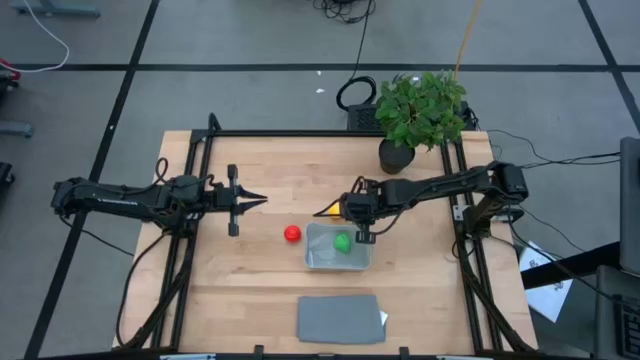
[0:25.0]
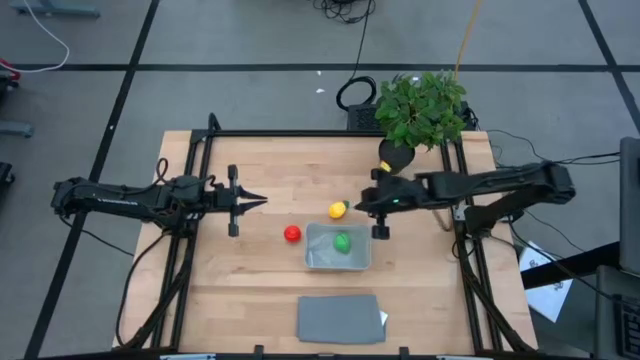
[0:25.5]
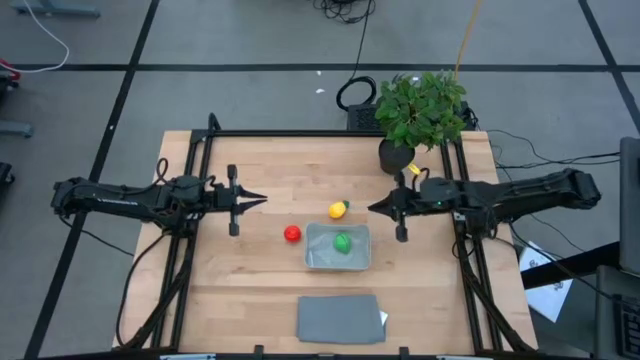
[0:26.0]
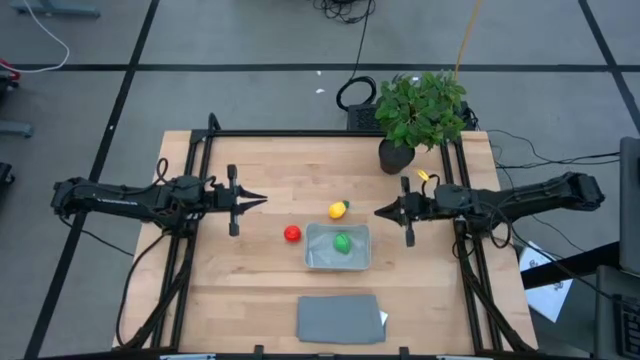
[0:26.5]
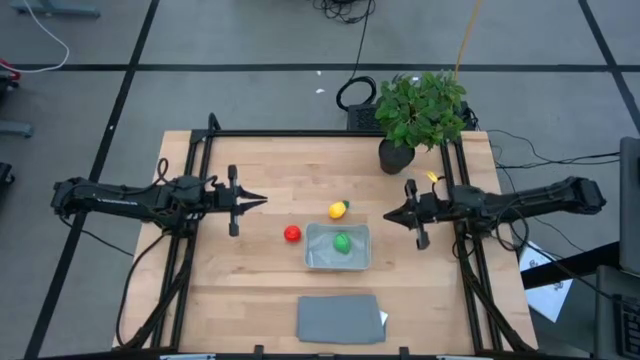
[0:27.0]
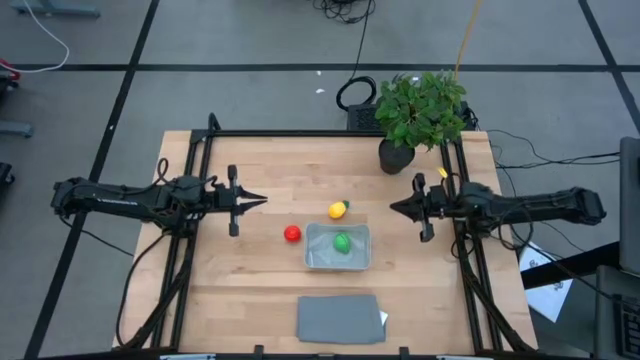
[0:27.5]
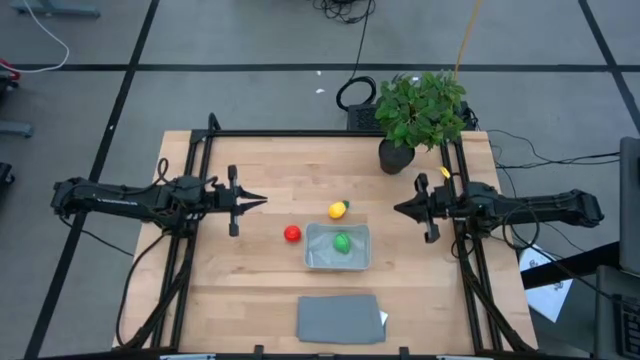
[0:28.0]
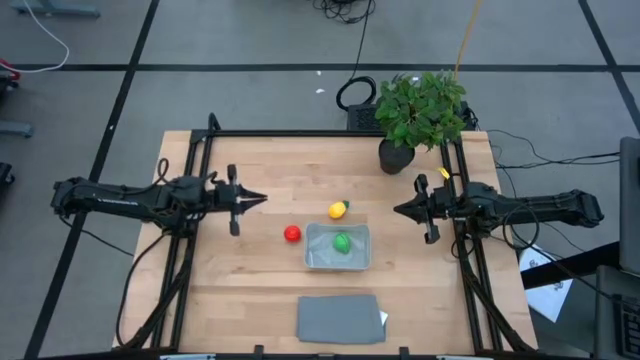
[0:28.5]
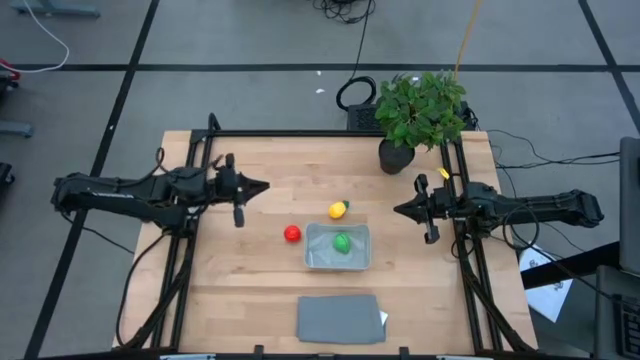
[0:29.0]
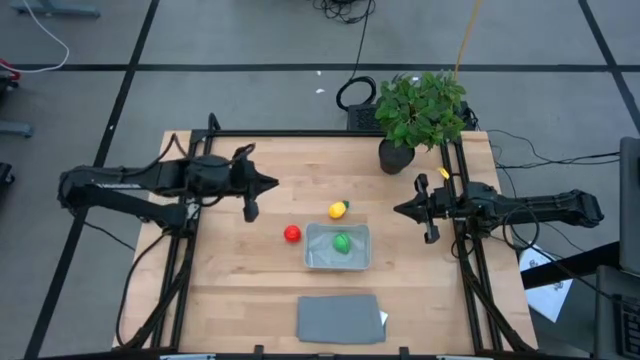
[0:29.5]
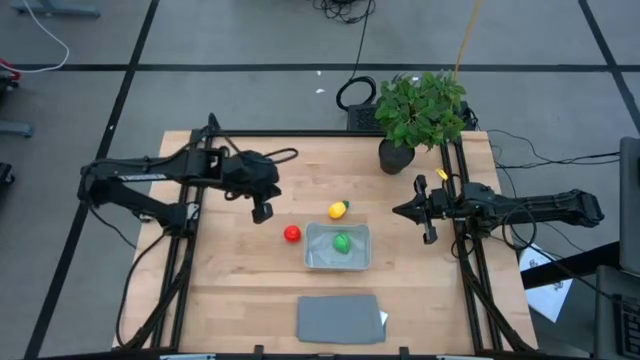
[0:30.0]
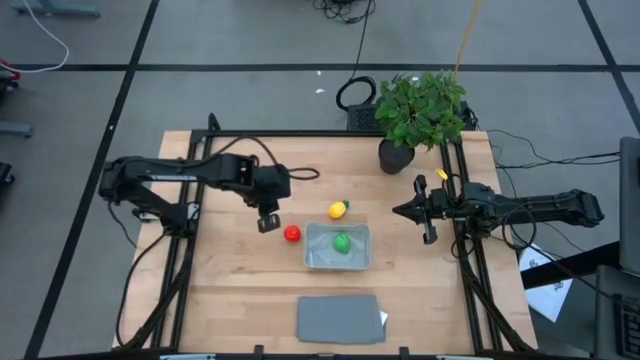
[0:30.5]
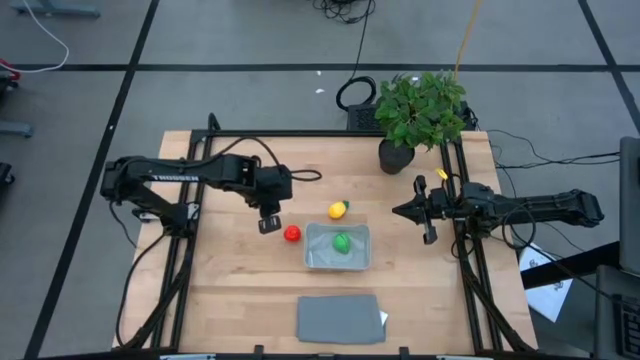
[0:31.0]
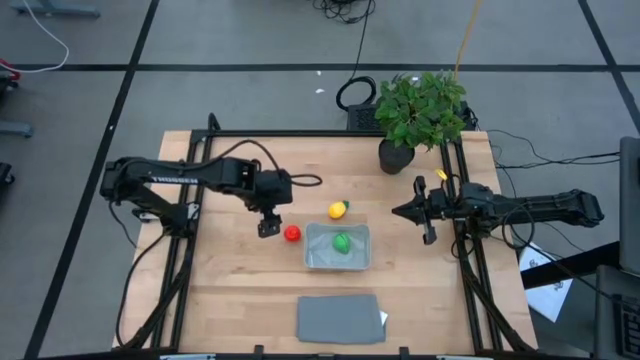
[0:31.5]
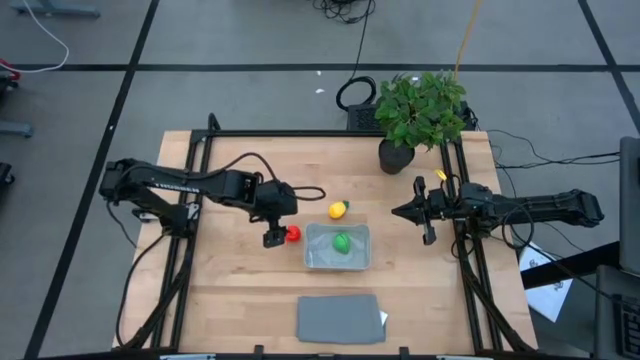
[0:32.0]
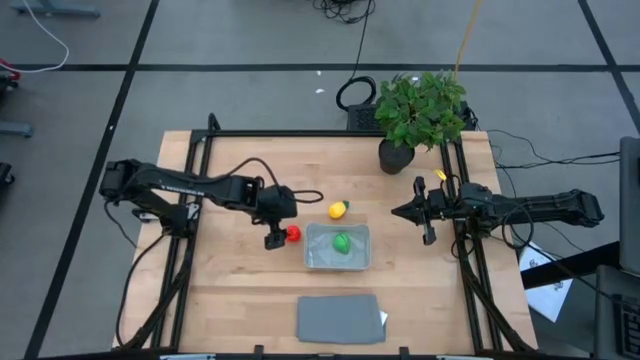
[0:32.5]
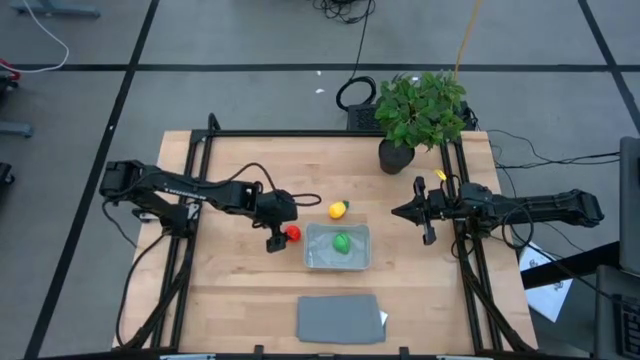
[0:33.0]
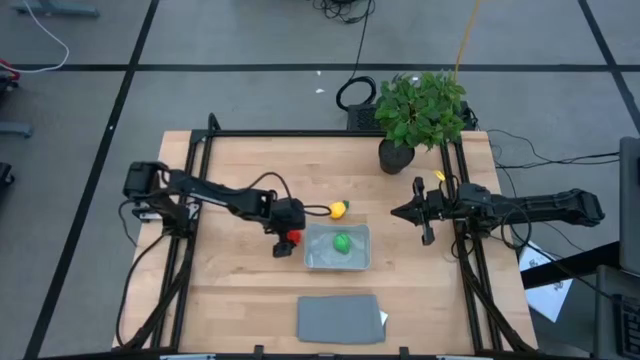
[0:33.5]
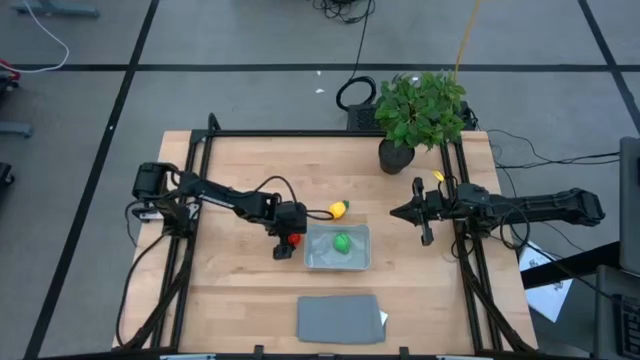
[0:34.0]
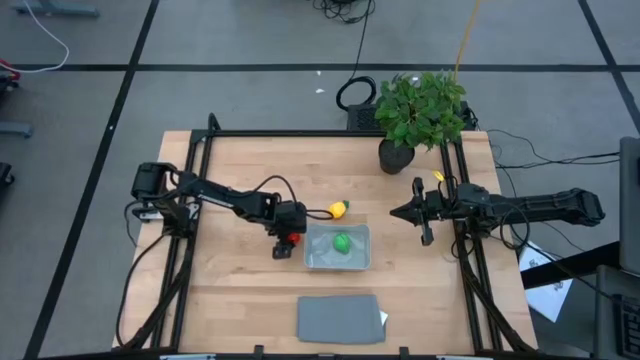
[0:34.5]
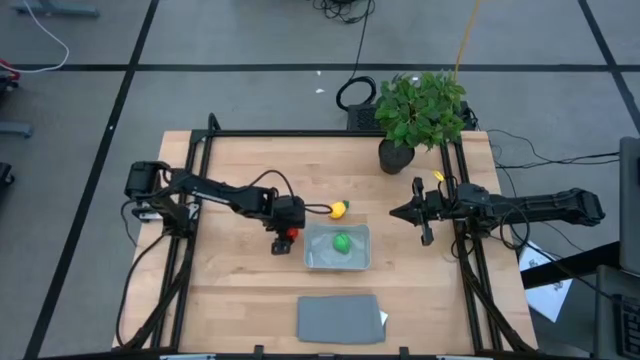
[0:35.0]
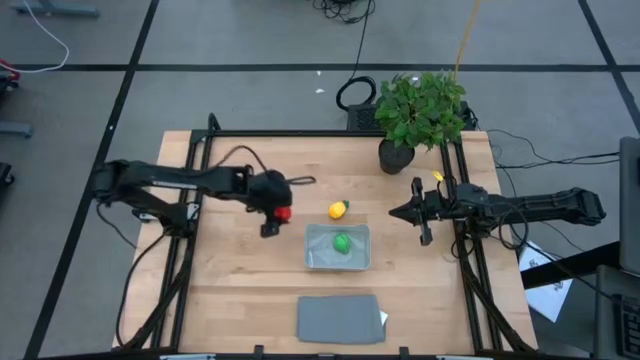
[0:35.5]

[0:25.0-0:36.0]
Task: Pick and placing Produce into tupperware
Put the tomato into the gray bin

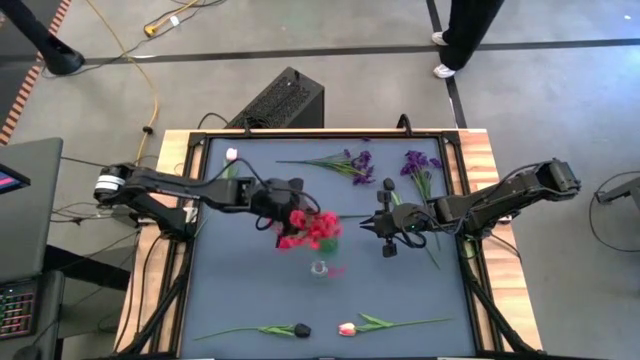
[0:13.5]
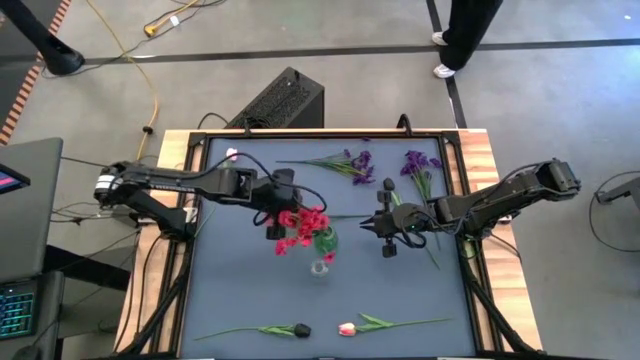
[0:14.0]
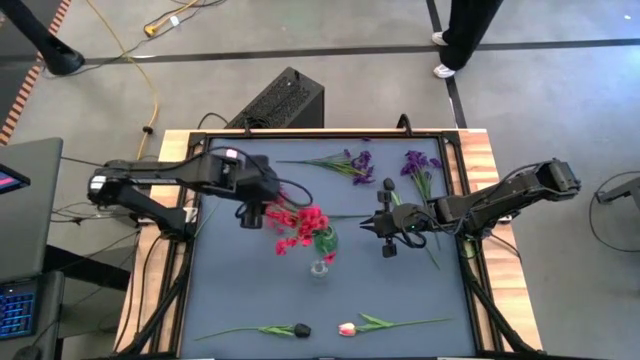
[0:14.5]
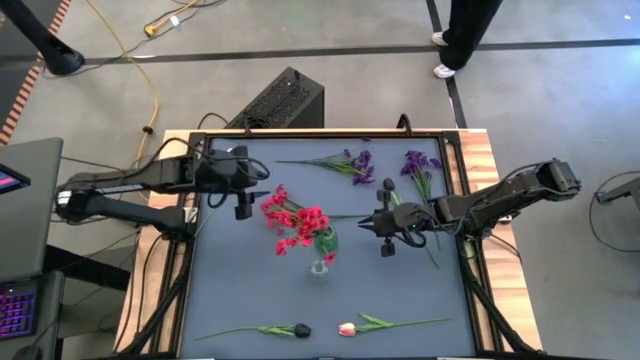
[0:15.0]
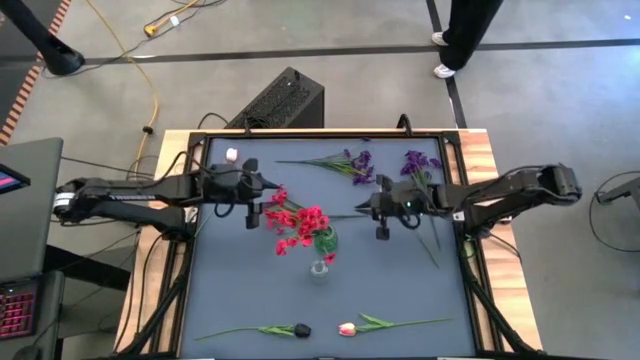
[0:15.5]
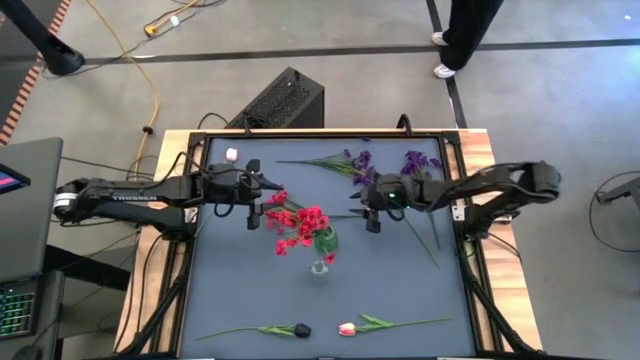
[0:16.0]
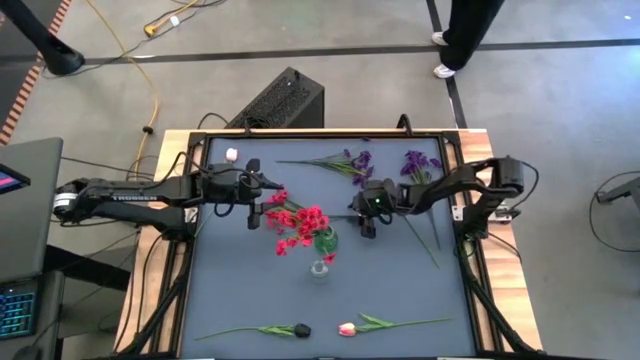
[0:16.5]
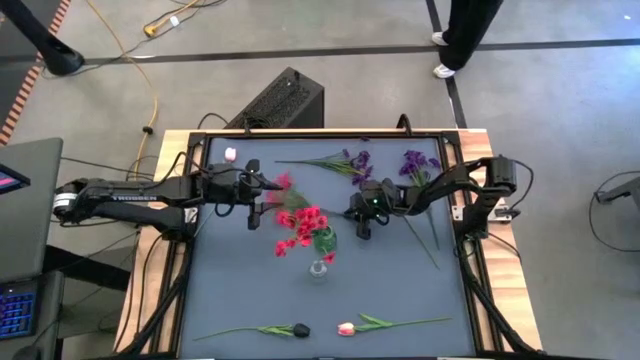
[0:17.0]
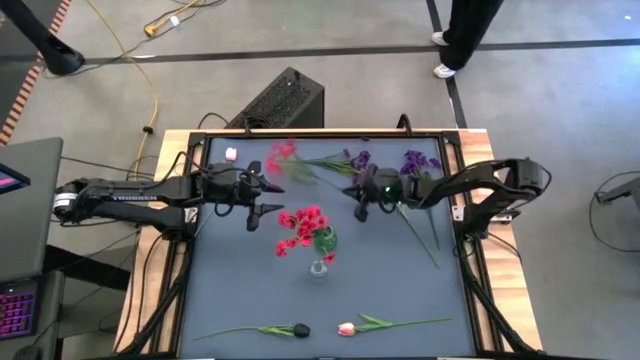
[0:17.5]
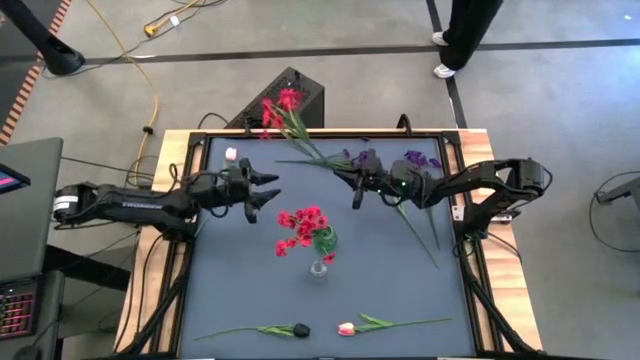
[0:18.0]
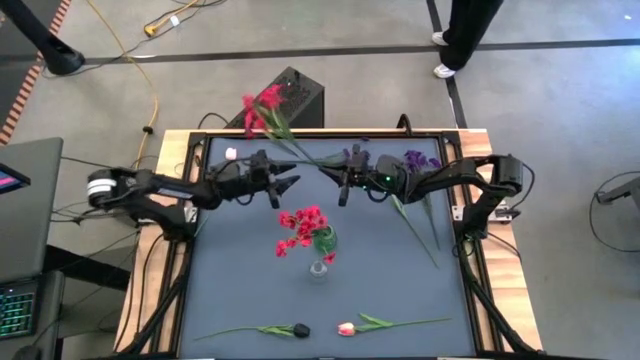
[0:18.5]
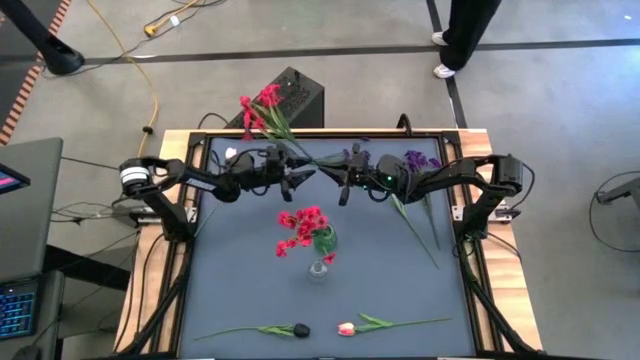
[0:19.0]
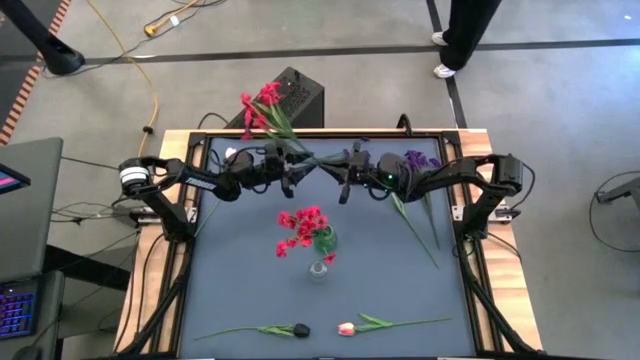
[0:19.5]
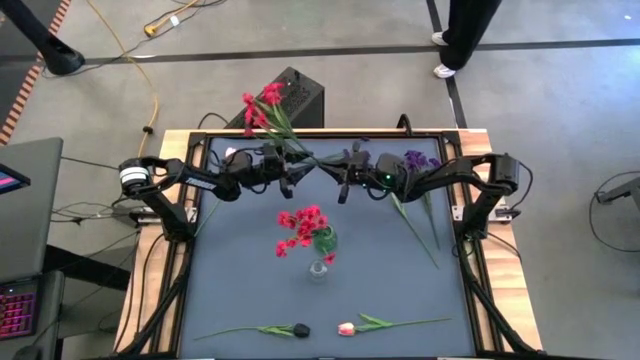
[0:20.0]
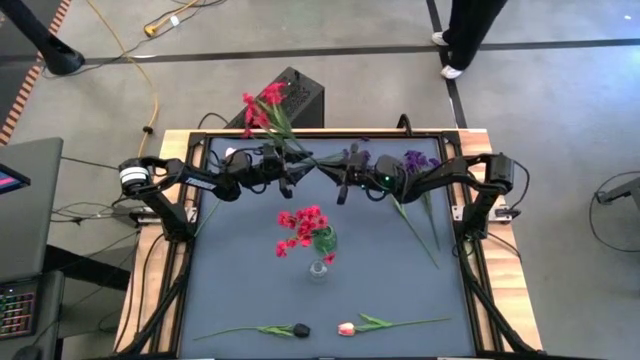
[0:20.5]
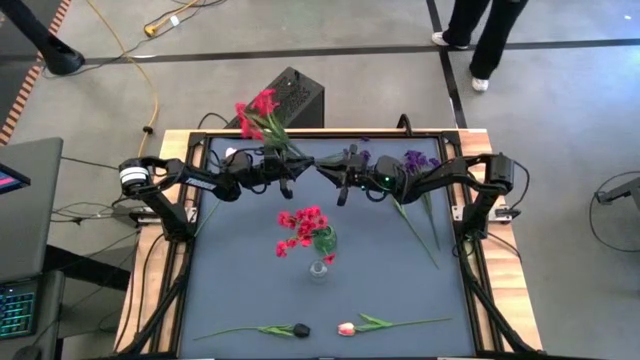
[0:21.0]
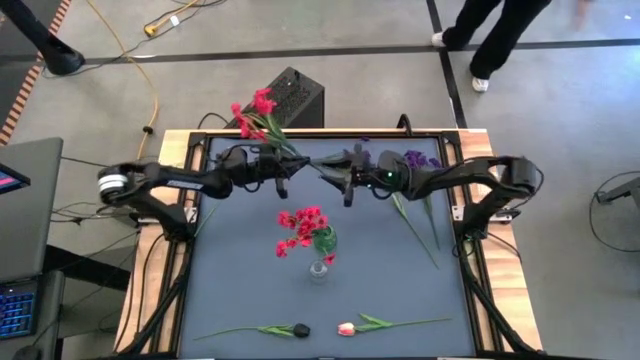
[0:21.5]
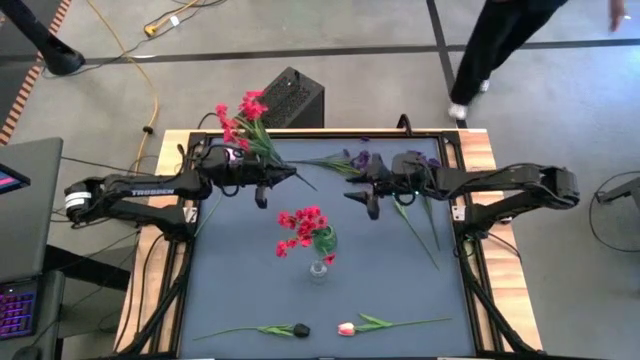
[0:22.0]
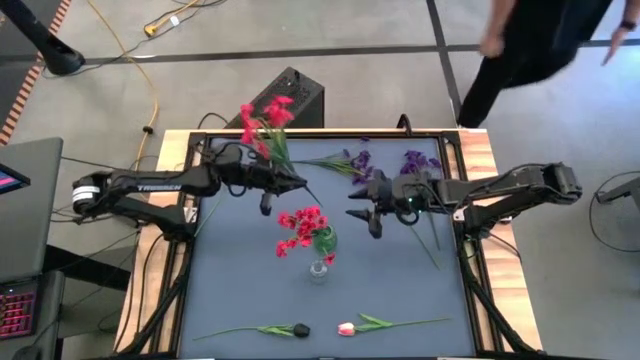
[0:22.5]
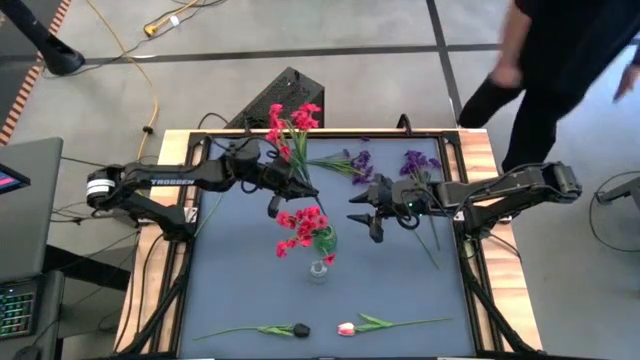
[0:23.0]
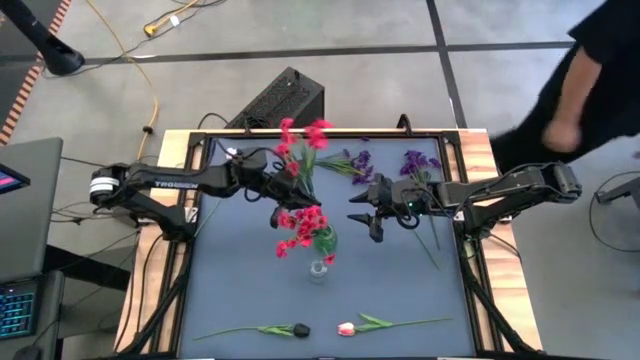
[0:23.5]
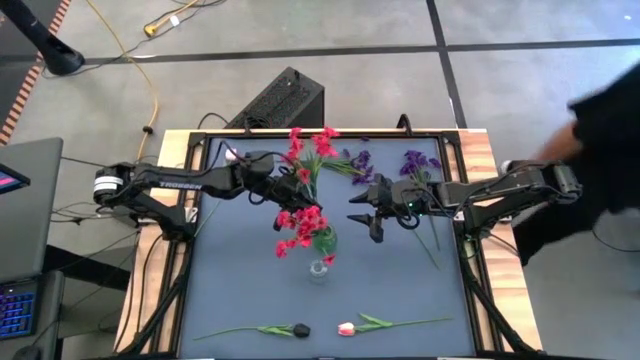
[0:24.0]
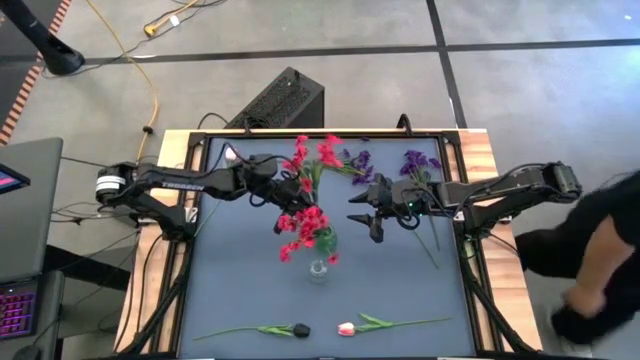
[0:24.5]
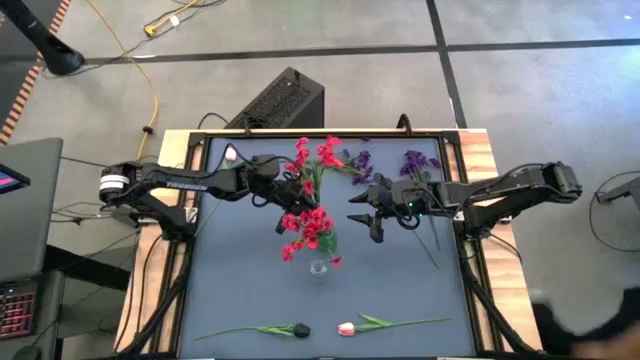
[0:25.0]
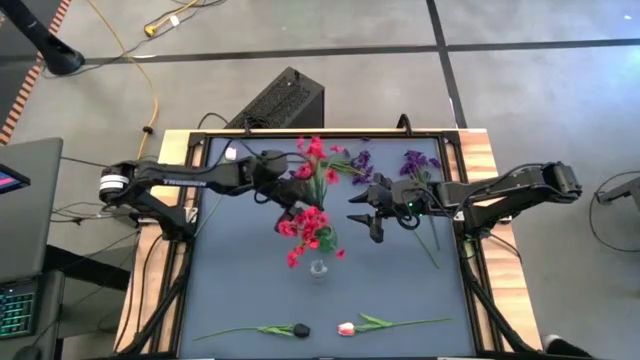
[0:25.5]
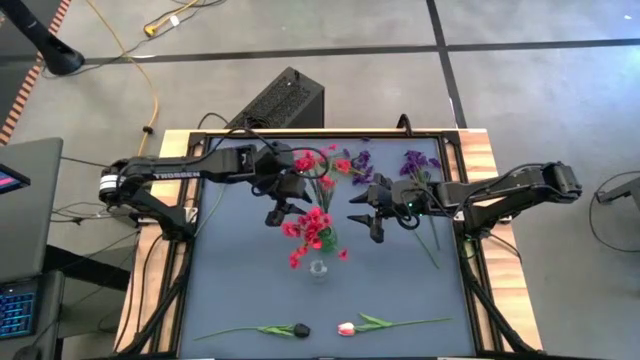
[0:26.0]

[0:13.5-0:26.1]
Task: Sort flowers into vase by color
Put the red flowers into the green vase
